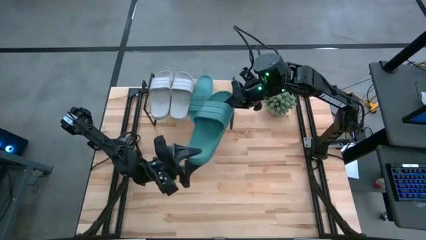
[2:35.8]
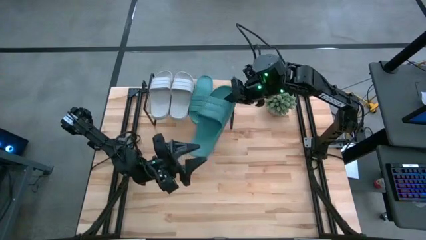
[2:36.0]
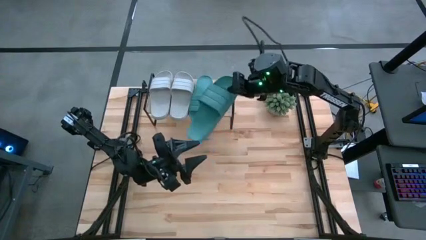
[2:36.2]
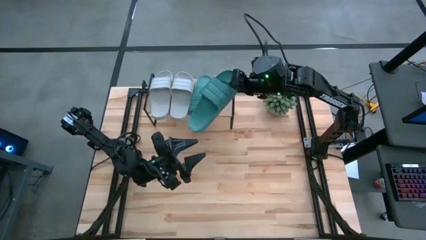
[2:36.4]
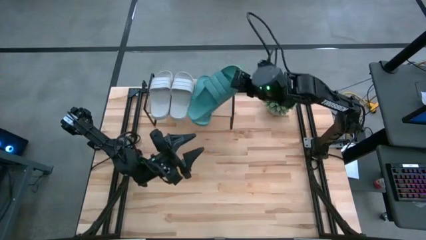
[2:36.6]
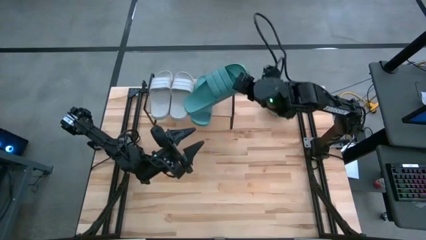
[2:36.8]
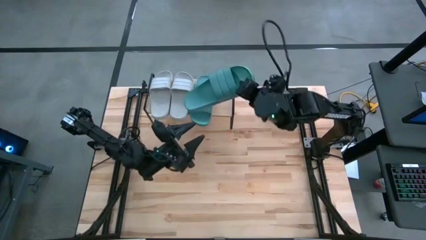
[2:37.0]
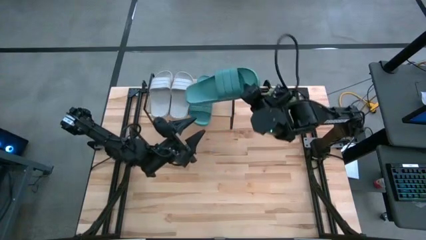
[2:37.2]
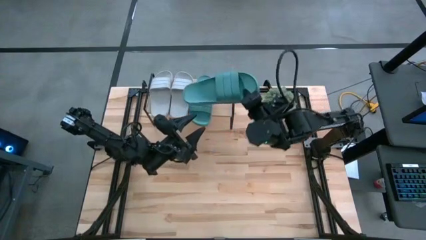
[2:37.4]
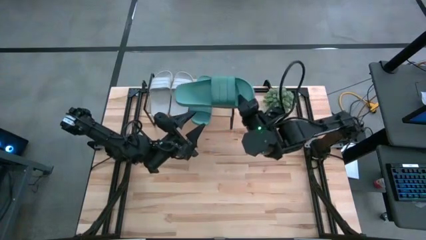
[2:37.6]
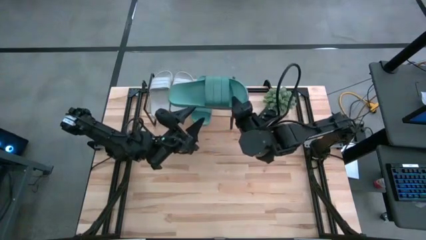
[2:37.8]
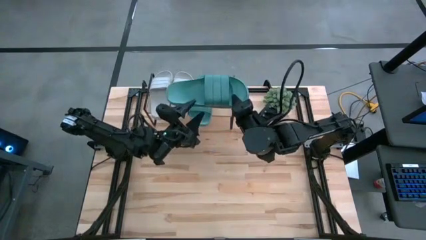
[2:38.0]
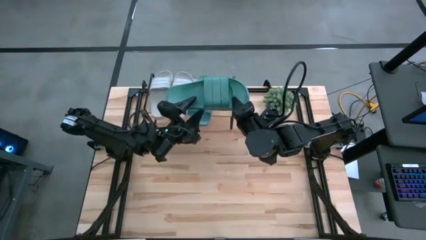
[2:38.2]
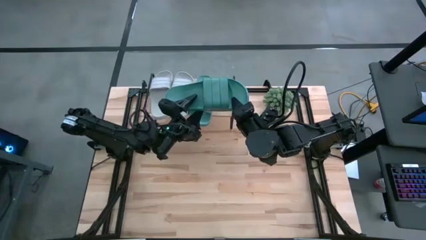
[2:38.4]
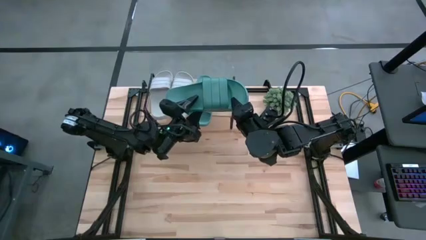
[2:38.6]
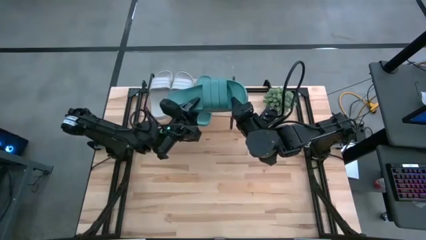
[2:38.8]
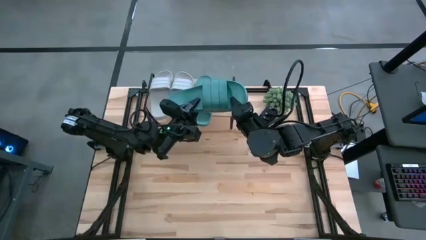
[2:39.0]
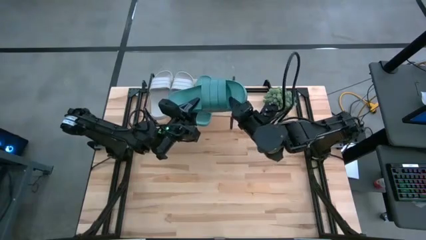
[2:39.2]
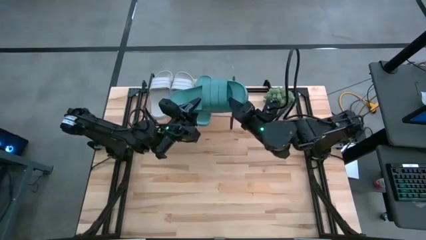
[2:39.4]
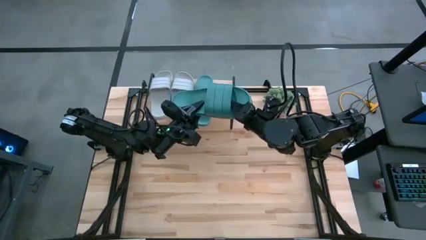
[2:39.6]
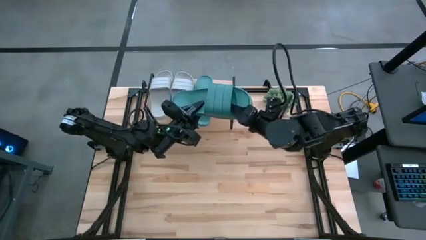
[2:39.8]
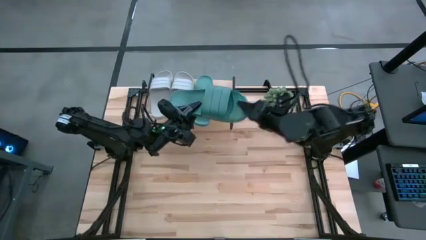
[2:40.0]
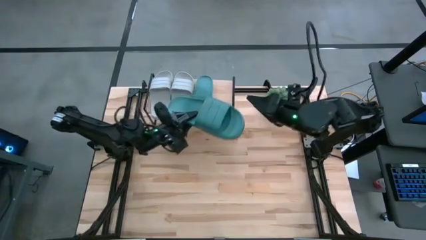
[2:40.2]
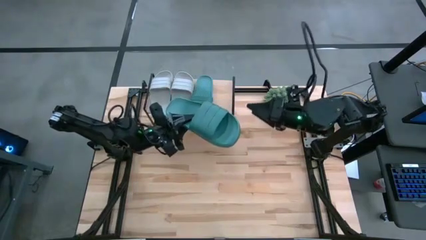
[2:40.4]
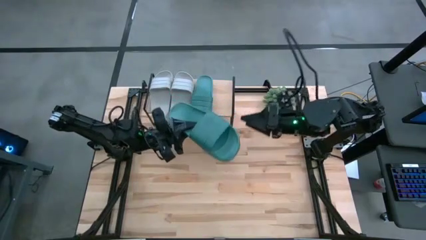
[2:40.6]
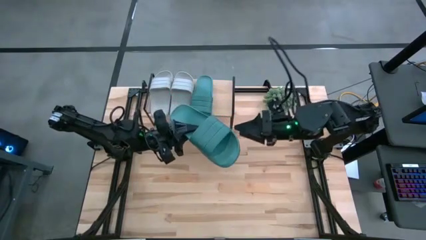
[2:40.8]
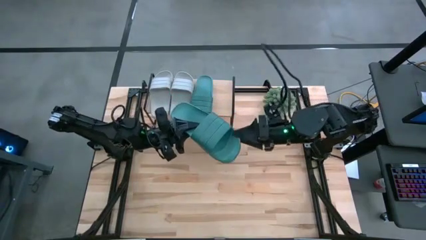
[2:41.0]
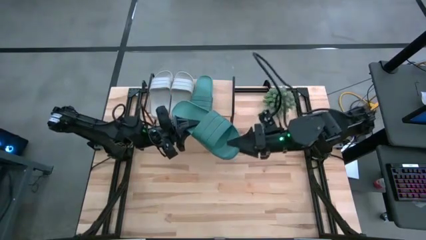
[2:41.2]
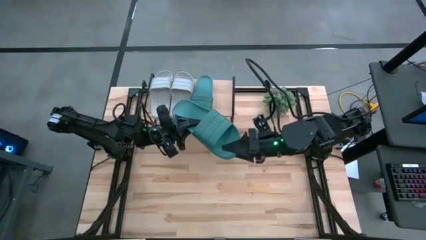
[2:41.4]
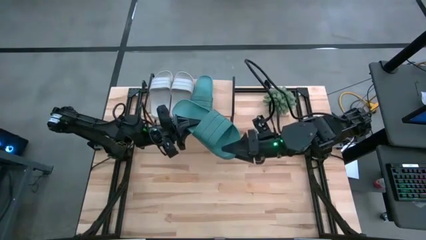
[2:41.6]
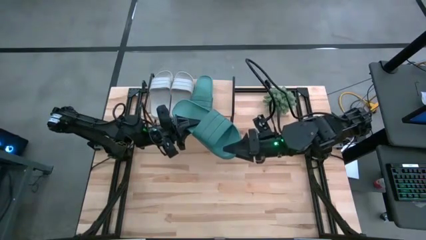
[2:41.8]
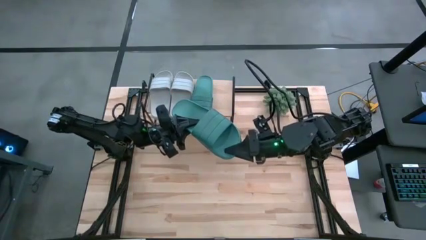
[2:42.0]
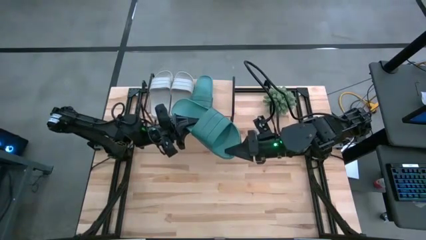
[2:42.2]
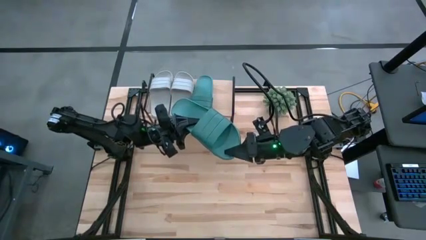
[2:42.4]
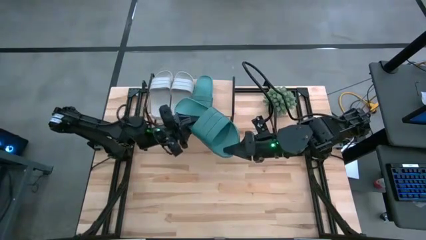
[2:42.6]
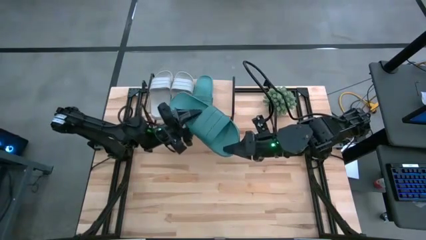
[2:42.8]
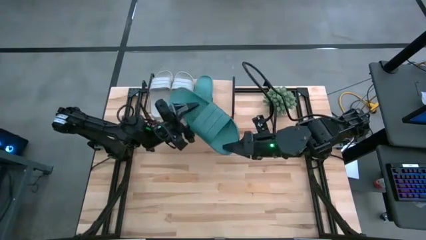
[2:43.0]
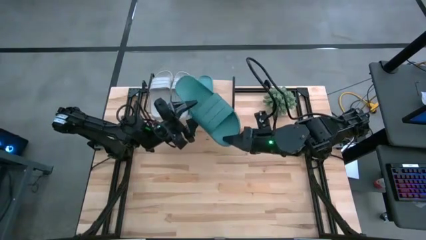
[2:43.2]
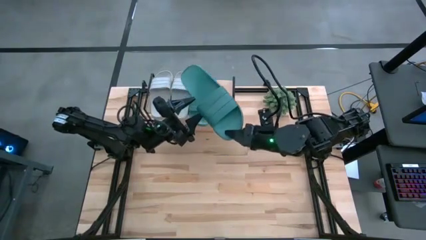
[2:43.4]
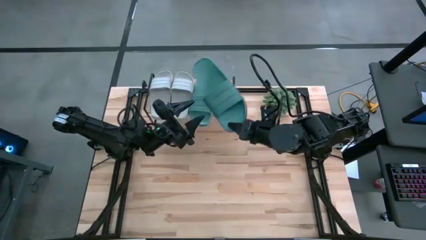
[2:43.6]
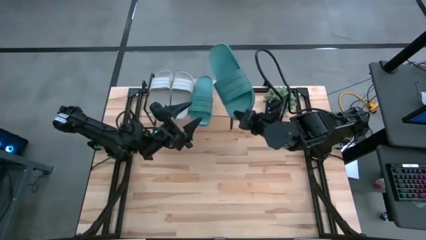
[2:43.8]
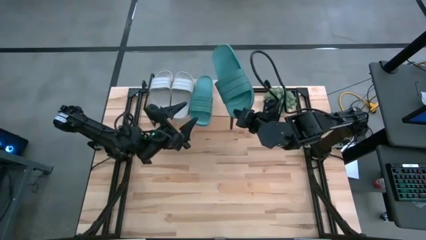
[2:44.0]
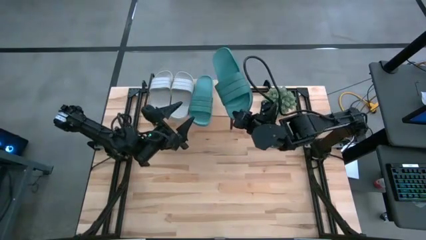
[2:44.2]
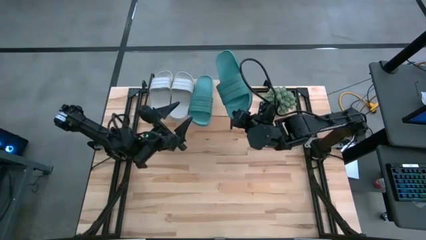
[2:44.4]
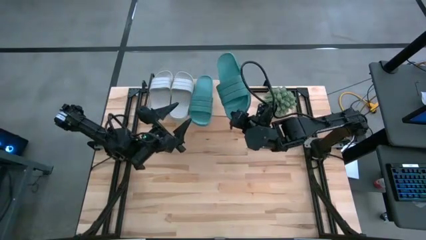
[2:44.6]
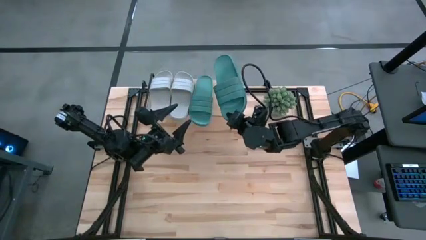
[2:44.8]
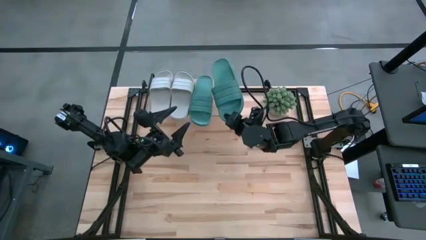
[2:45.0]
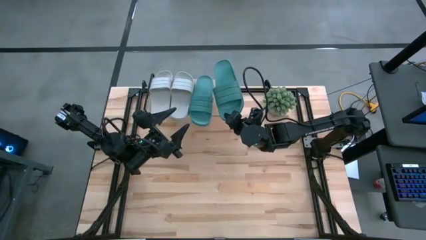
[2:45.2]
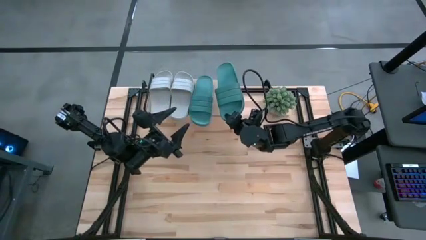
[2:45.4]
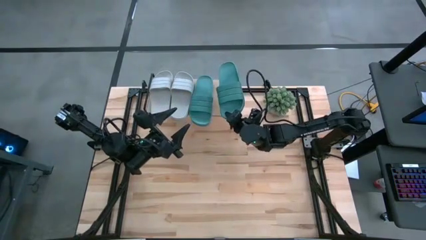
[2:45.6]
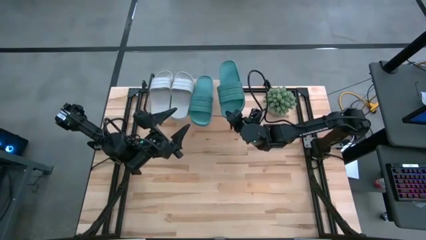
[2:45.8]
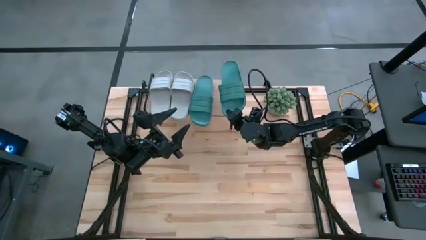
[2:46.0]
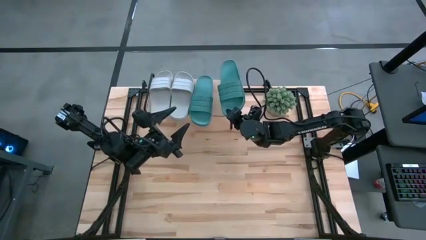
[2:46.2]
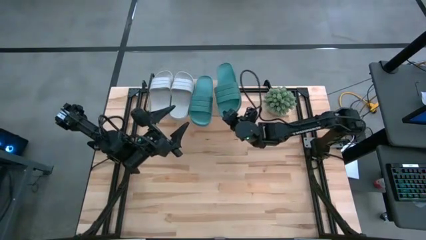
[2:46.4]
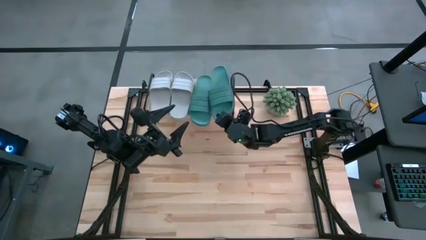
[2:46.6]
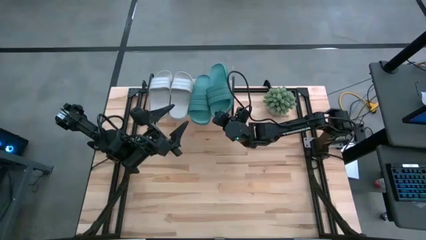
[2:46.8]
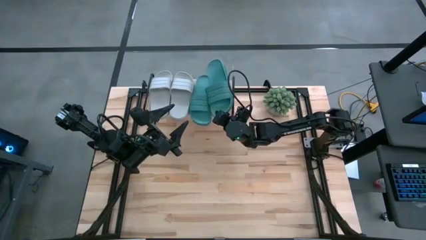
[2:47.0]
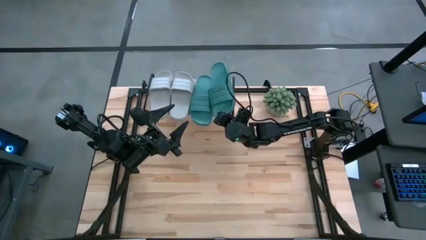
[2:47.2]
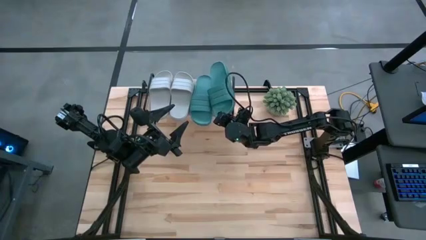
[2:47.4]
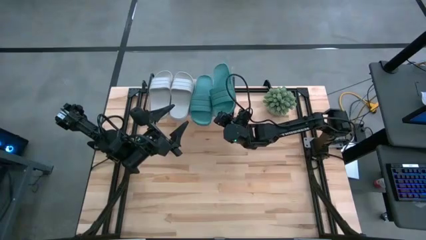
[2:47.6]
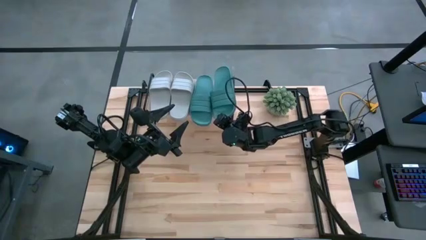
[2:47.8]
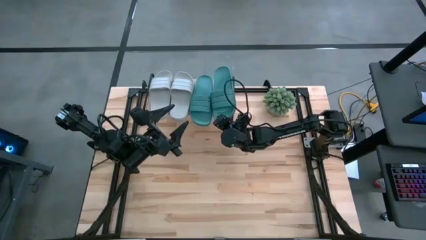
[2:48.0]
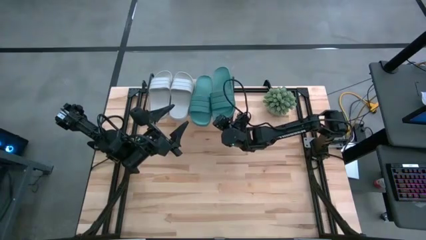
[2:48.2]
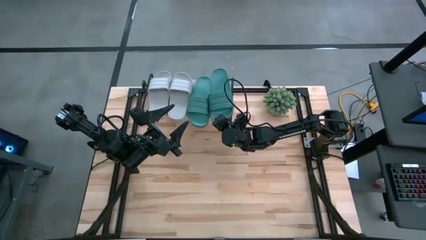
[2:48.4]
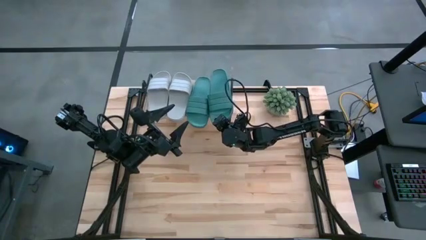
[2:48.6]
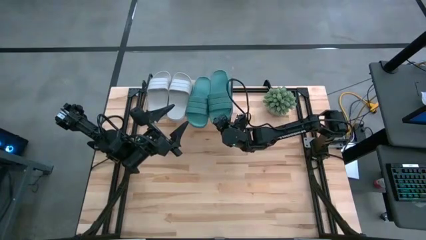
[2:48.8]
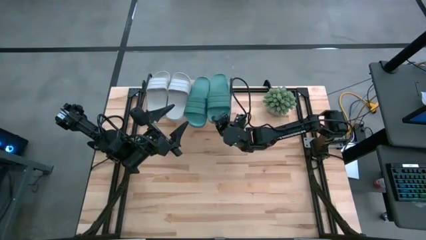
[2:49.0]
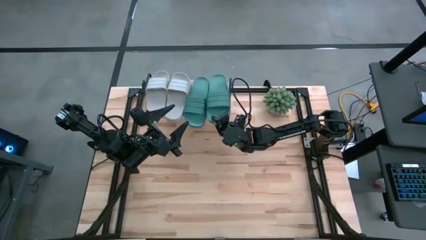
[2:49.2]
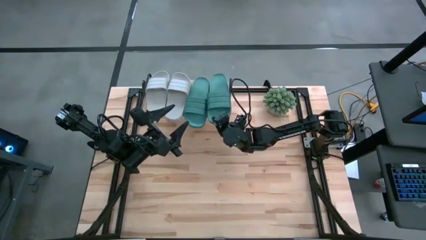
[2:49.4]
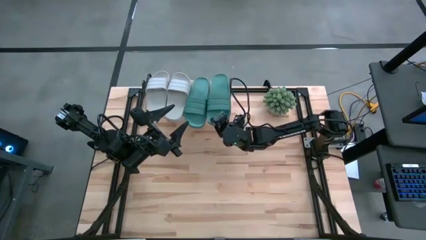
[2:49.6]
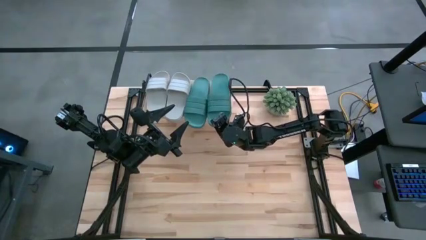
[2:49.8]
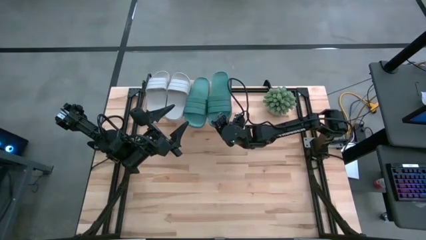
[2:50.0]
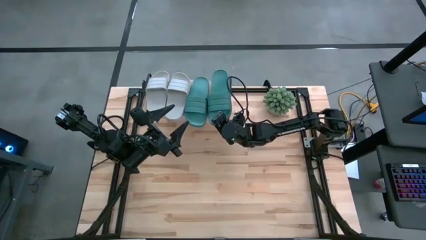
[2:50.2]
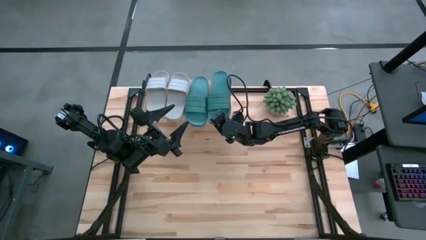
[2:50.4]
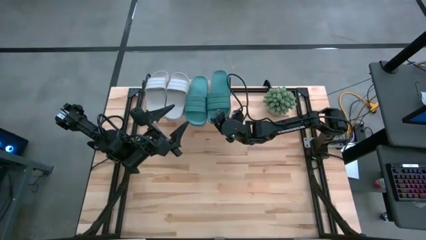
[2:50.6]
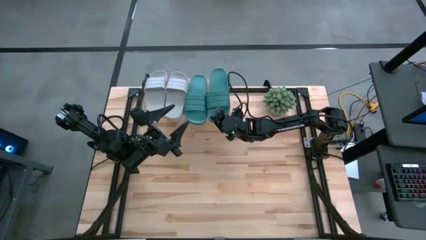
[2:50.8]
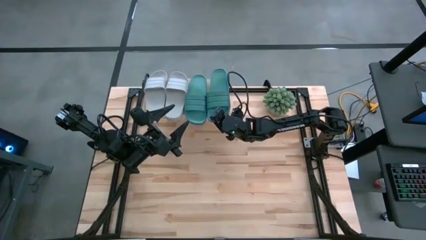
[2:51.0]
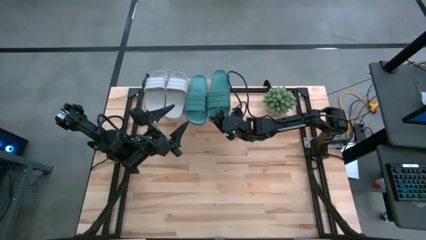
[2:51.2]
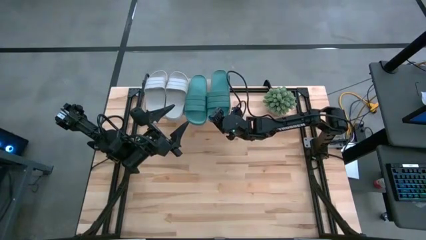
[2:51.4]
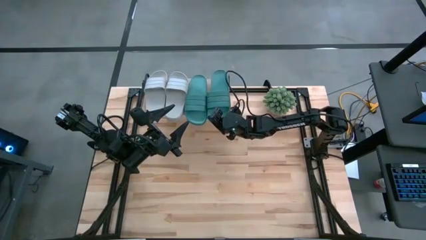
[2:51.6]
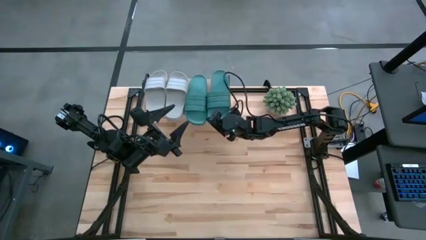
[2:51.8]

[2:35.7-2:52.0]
Task: Pick and place slides into the shelf
Put the green slipper on the shelf
